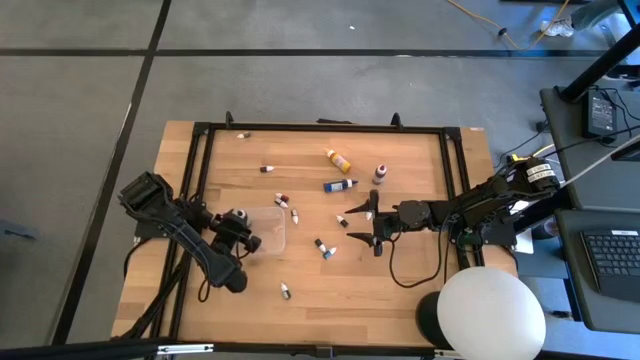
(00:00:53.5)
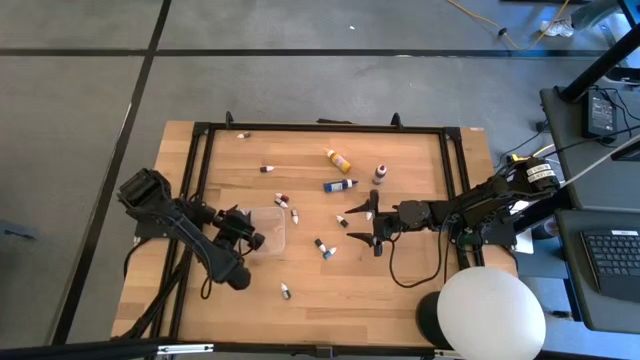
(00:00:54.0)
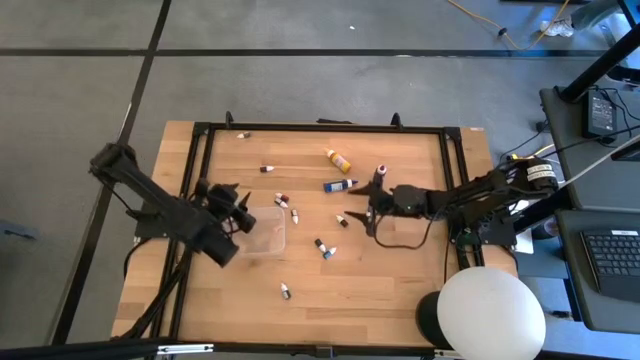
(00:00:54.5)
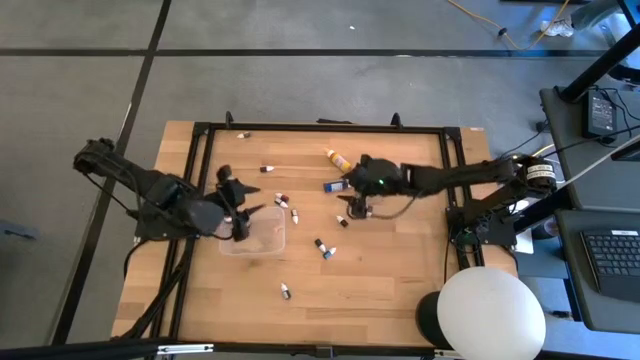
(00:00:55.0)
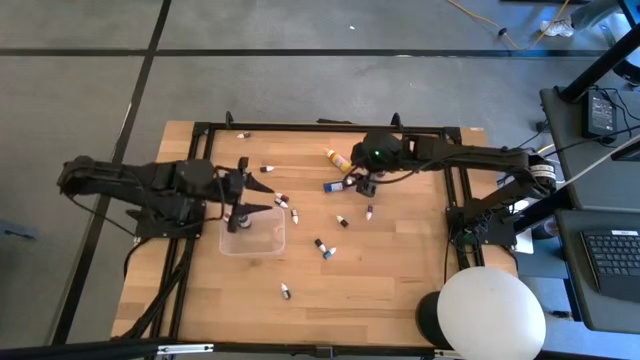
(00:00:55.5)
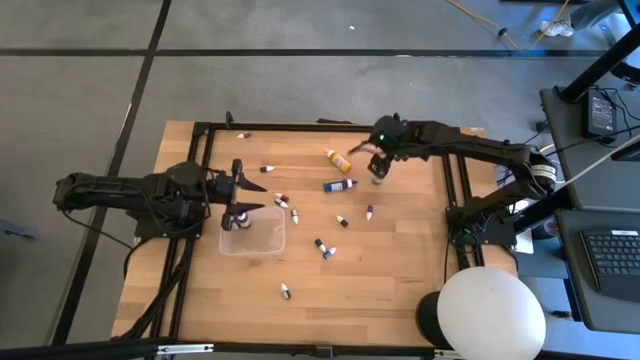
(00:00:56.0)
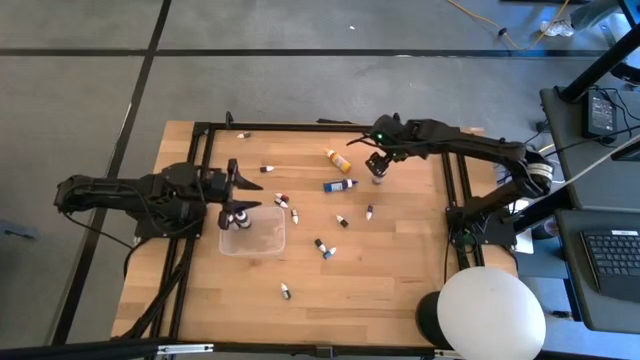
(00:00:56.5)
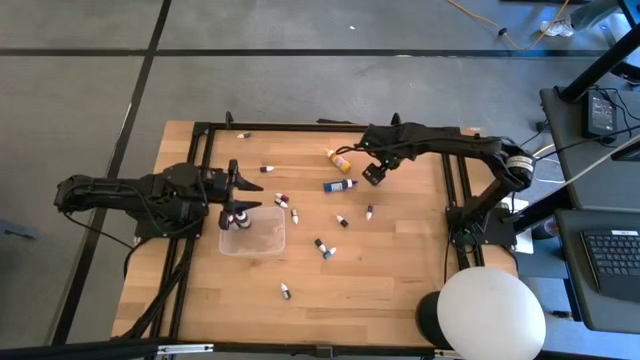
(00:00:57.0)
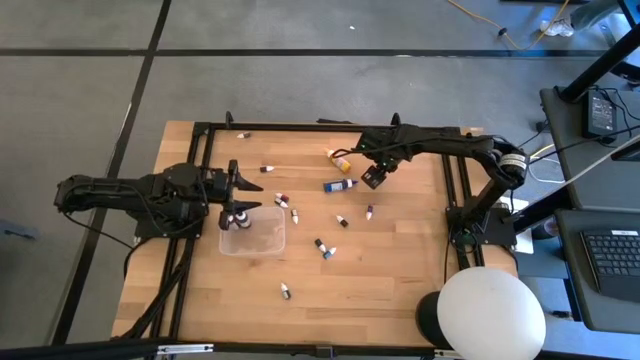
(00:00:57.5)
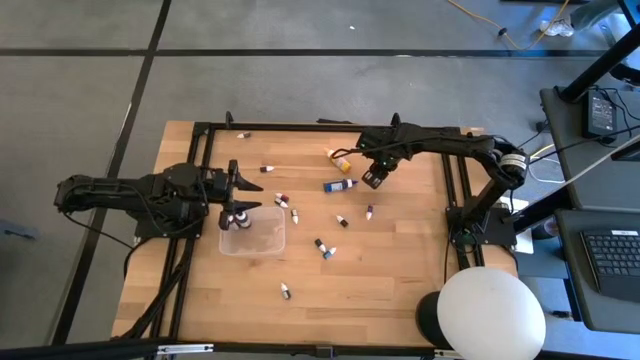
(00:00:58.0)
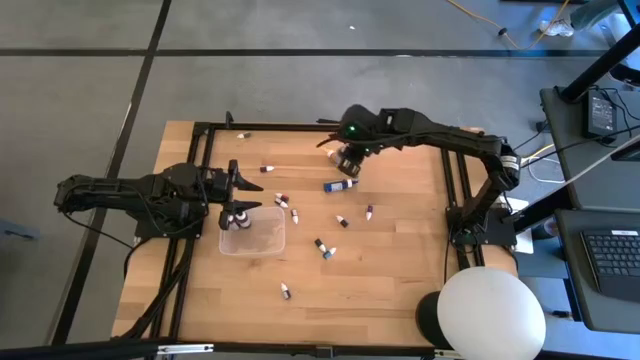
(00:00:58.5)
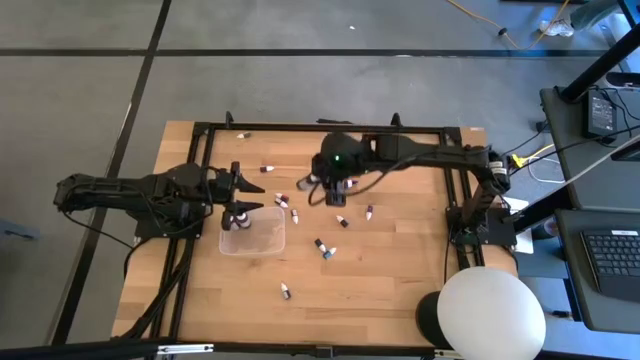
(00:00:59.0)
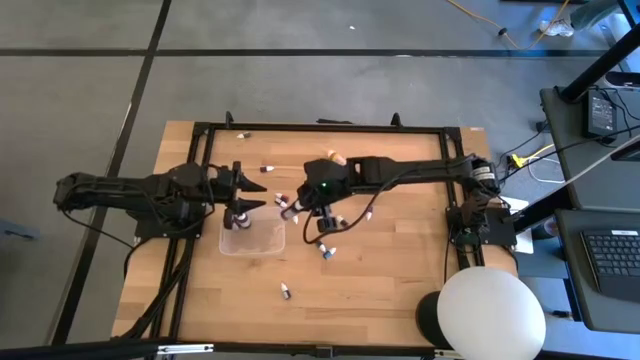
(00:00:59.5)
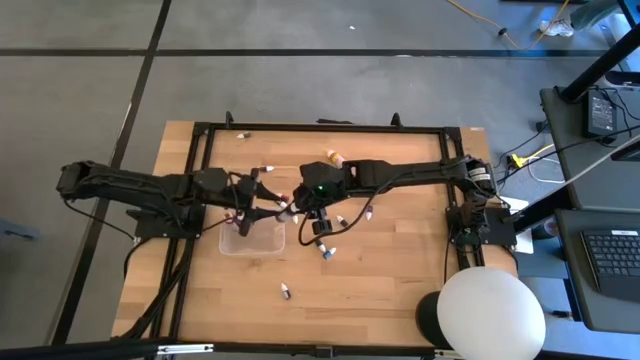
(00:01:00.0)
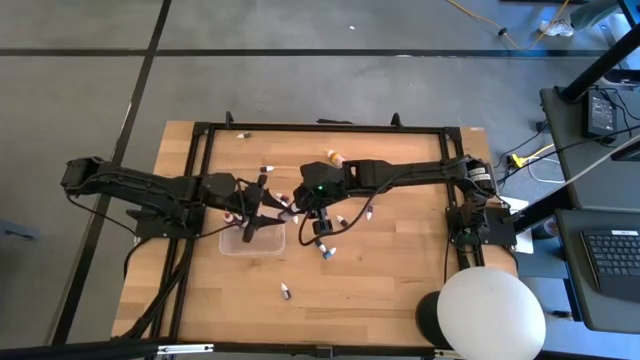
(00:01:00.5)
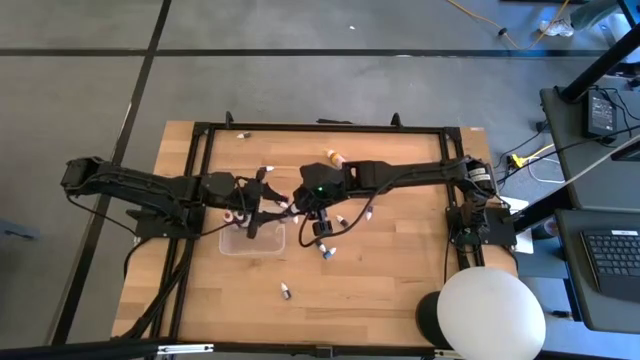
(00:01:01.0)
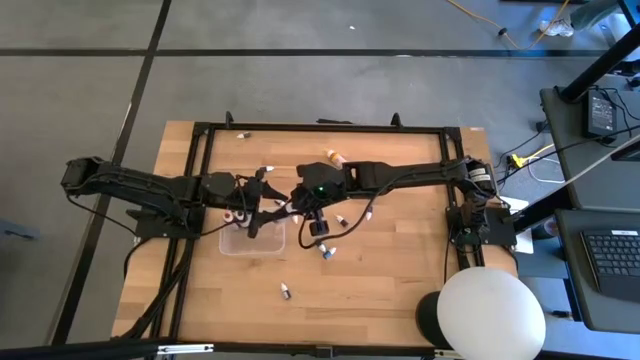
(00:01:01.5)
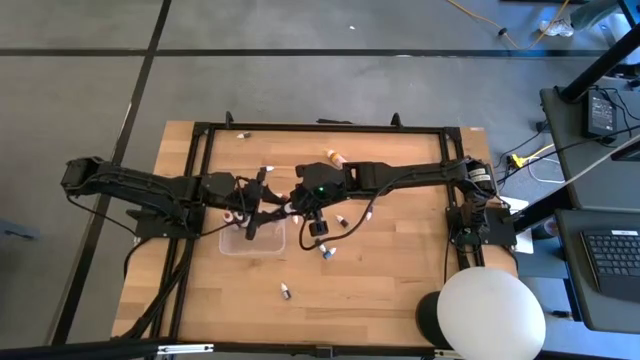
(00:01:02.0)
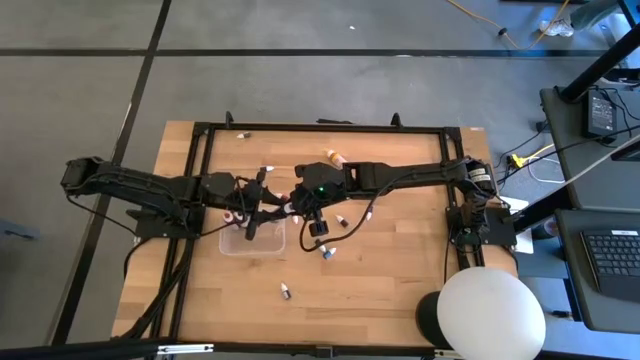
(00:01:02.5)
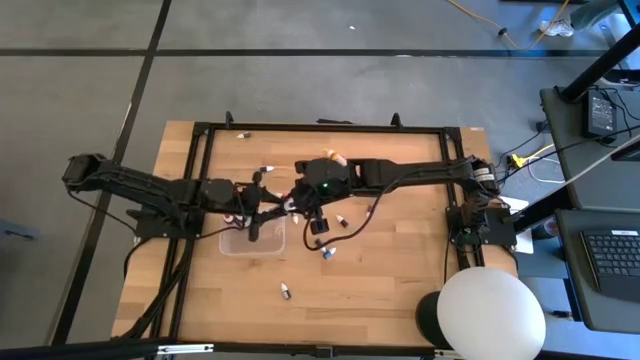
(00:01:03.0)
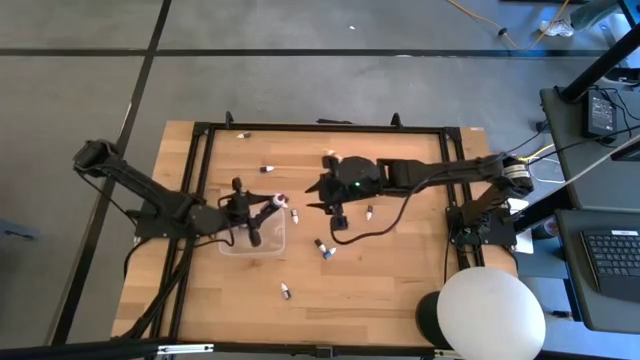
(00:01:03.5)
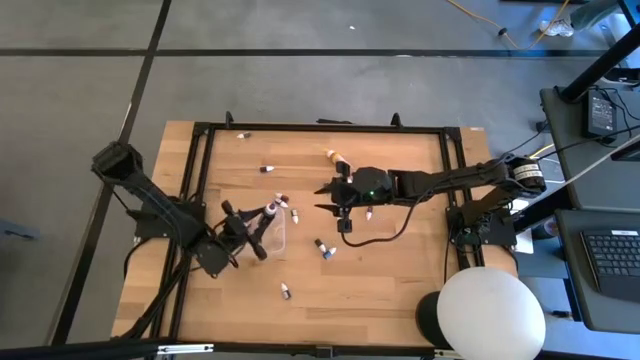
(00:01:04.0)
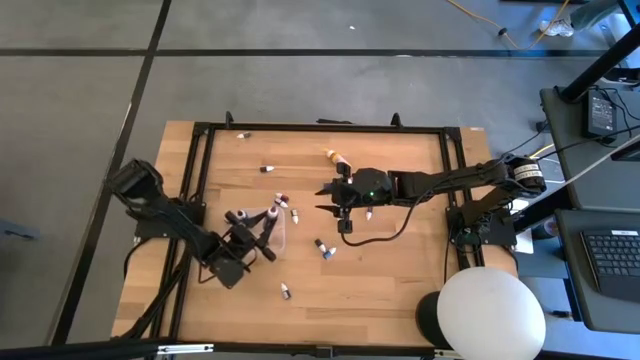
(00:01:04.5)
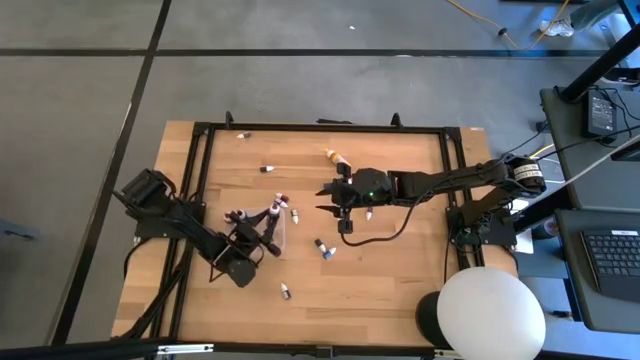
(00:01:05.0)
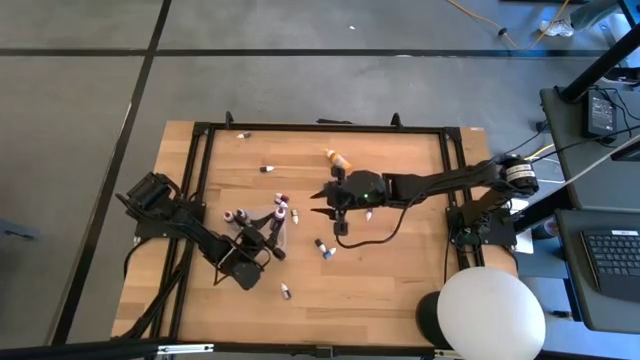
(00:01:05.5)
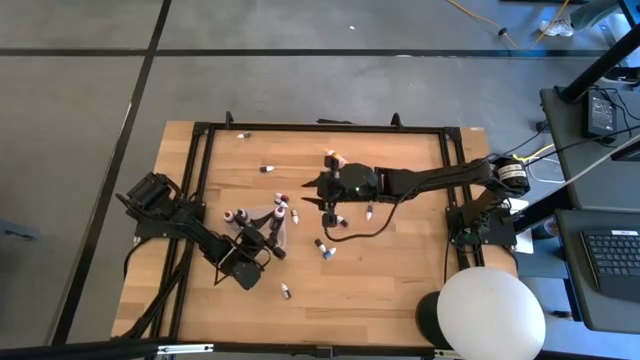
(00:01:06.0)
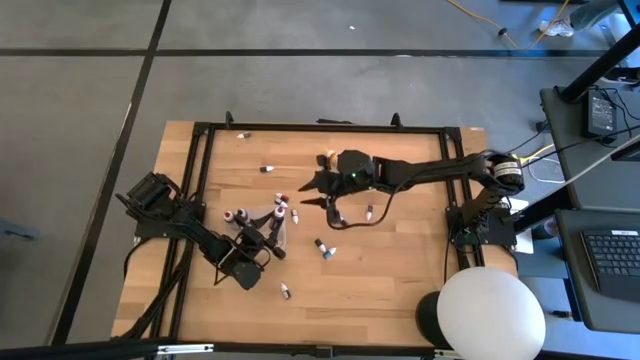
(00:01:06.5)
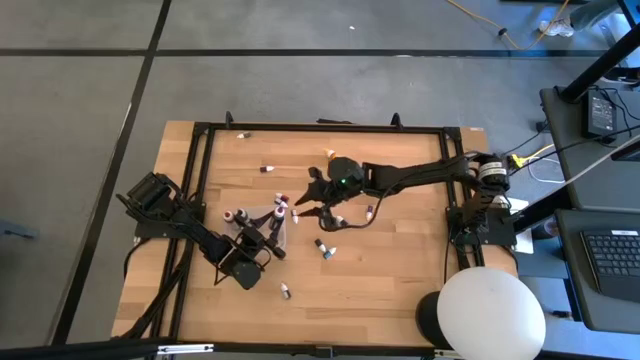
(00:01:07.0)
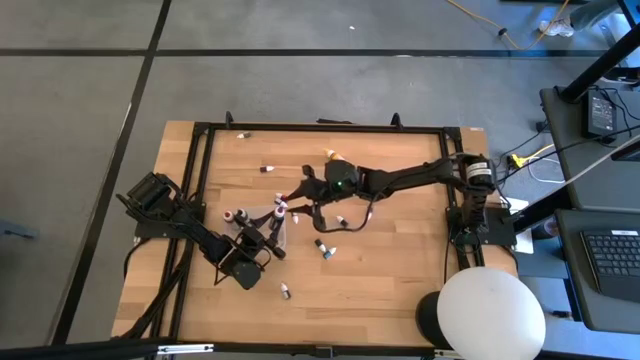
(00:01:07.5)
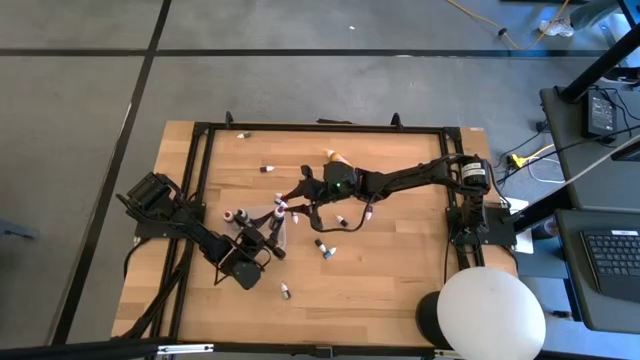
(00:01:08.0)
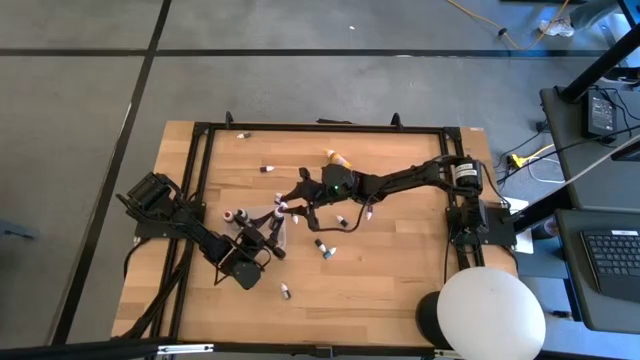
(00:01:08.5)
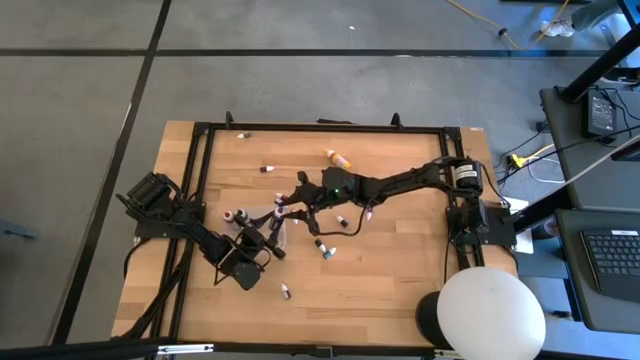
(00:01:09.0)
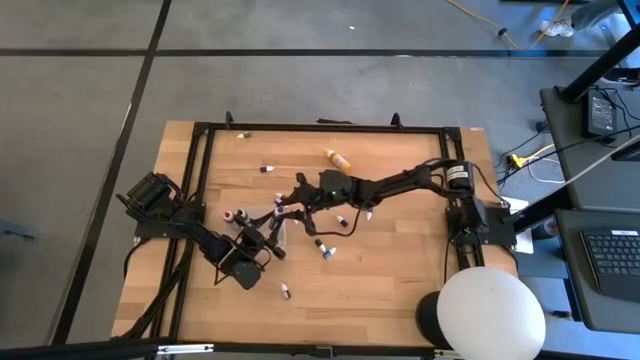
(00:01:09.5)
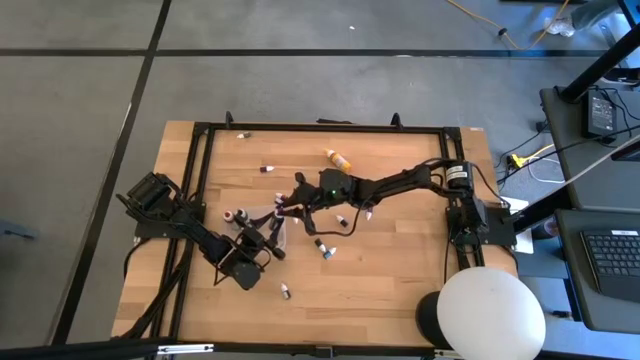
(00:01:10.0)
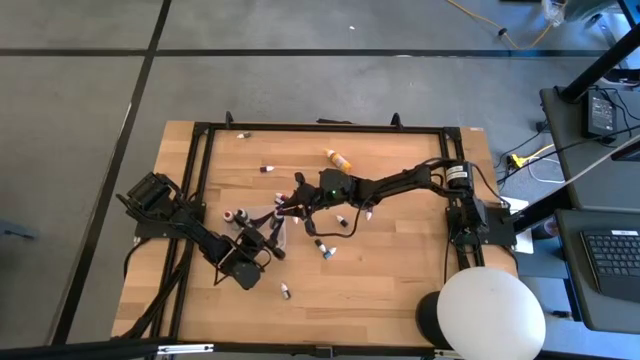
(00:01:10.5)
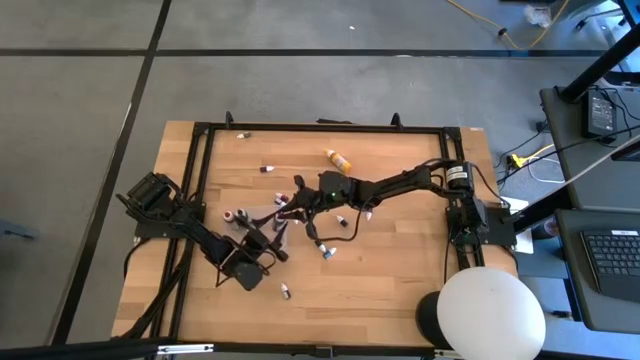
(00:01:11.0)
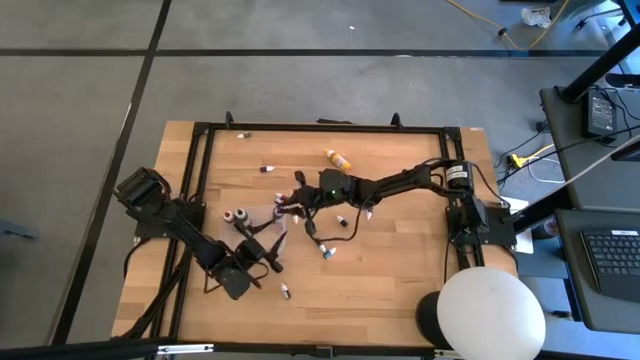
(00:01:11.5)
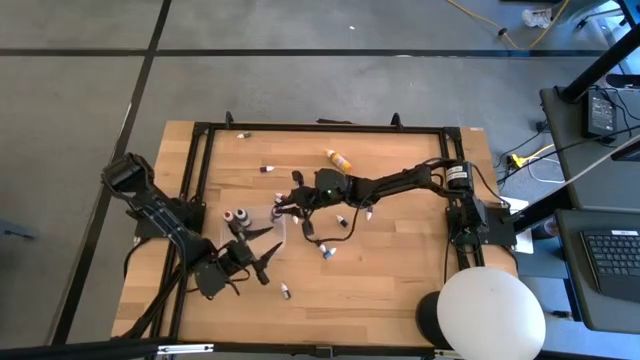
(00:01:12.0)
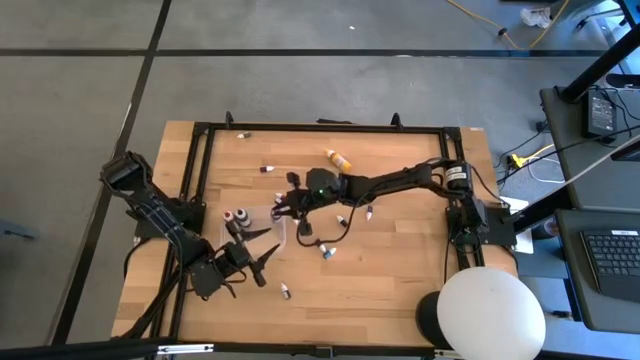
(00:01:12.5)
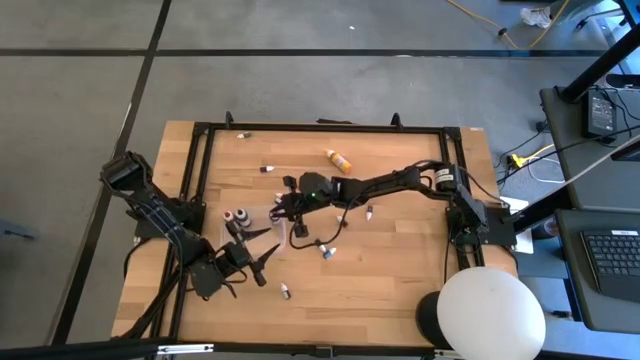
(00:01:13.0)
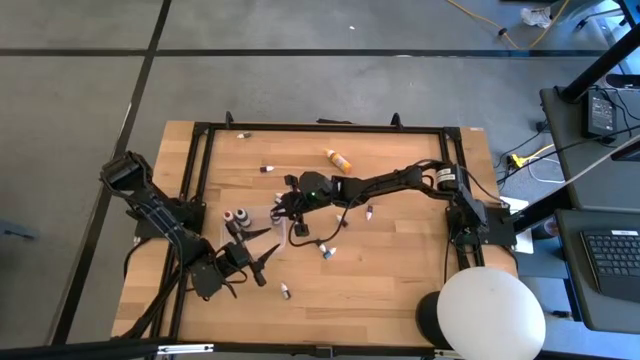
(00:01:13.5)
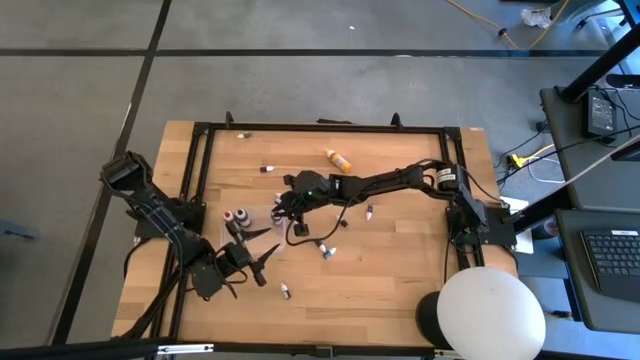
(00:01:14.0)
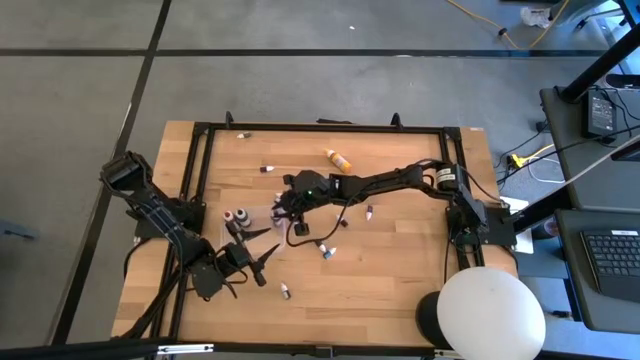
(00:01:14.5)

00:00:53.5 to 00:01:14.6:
Task: Pick & Place food coloring
Put the large purple food coloring bottle into the transparent bin
